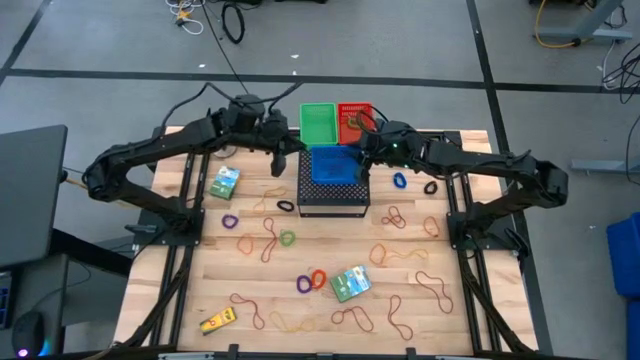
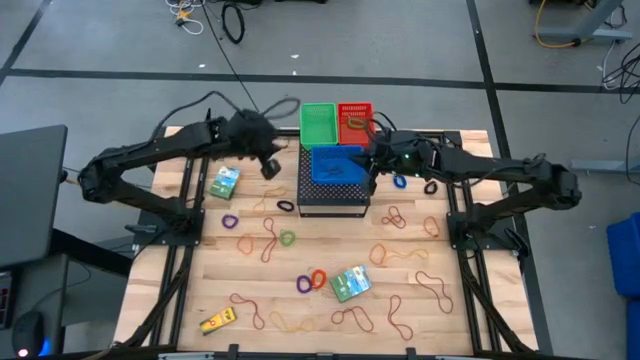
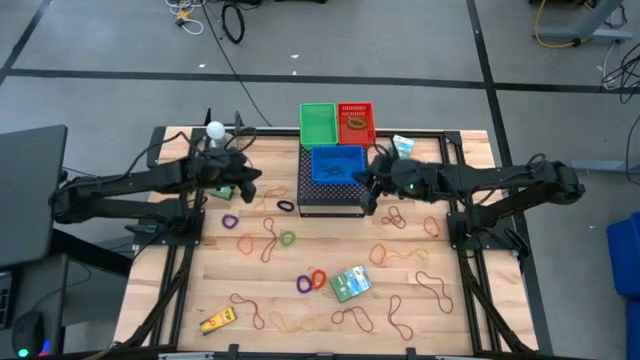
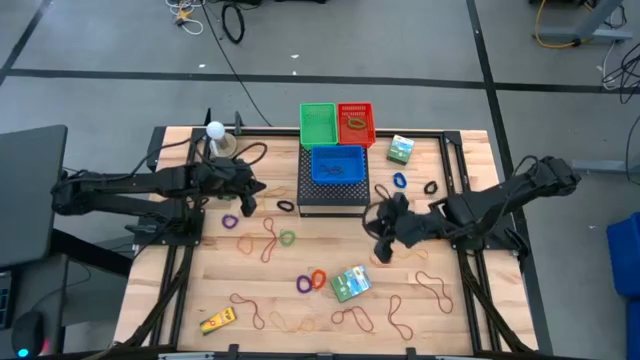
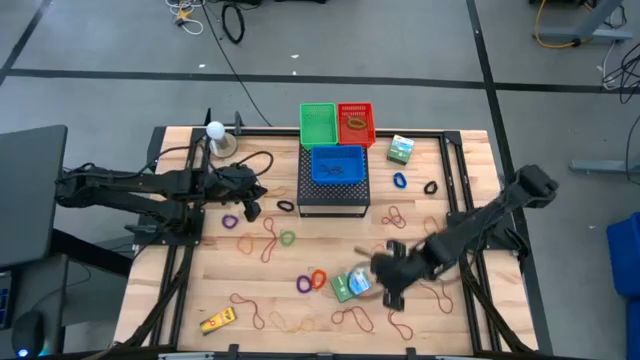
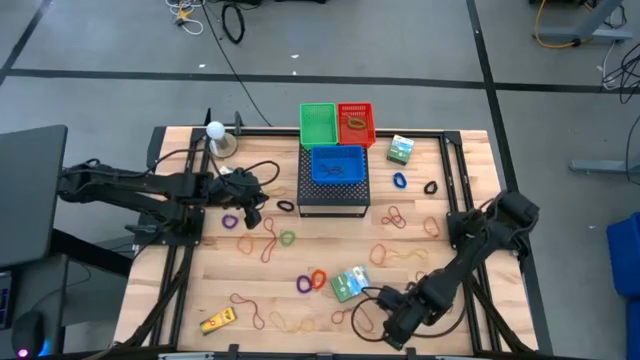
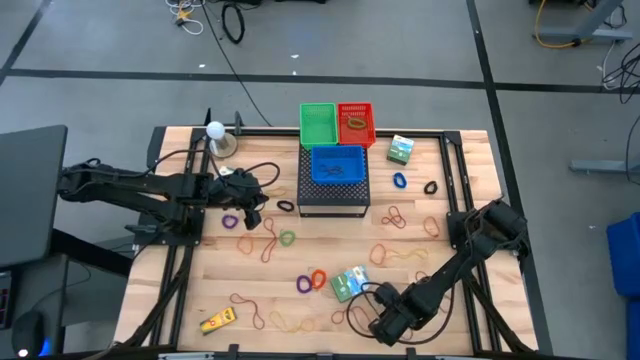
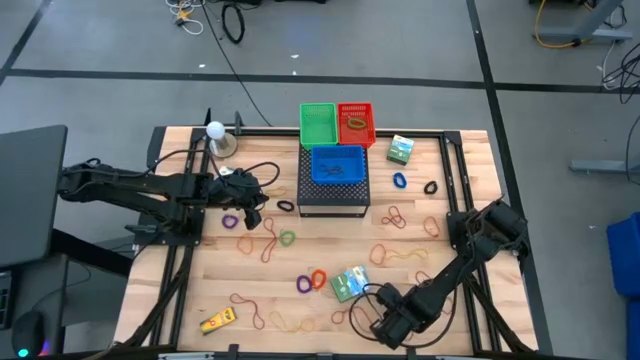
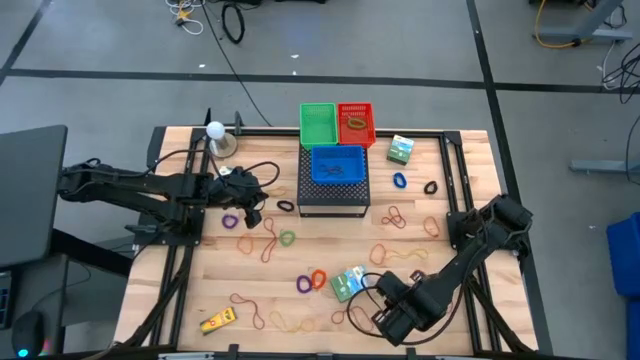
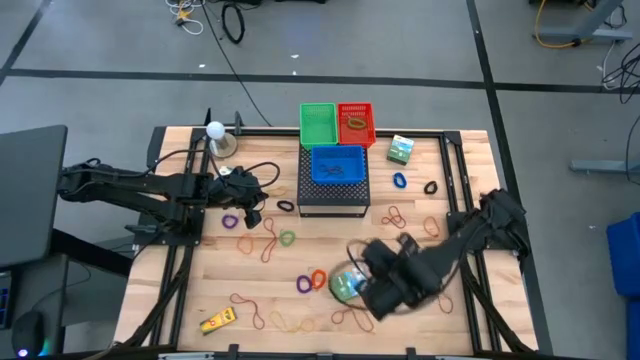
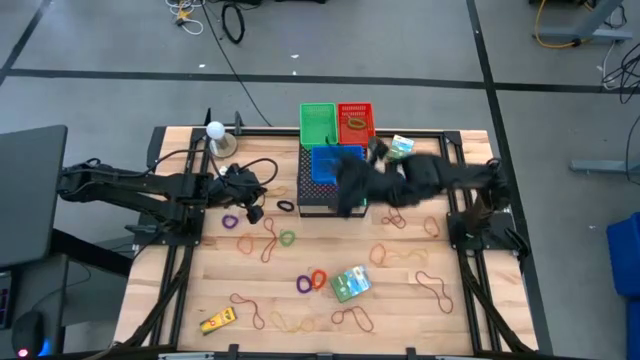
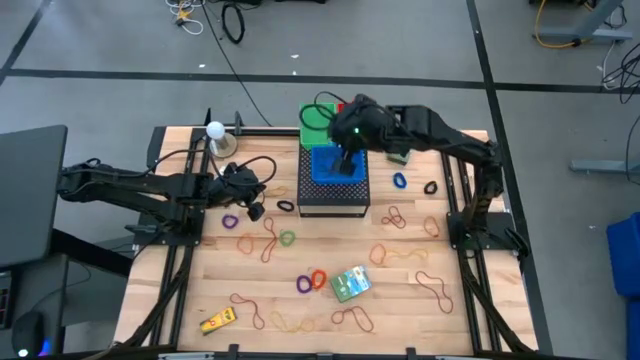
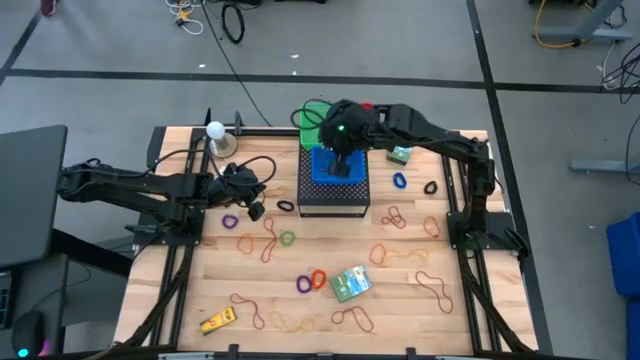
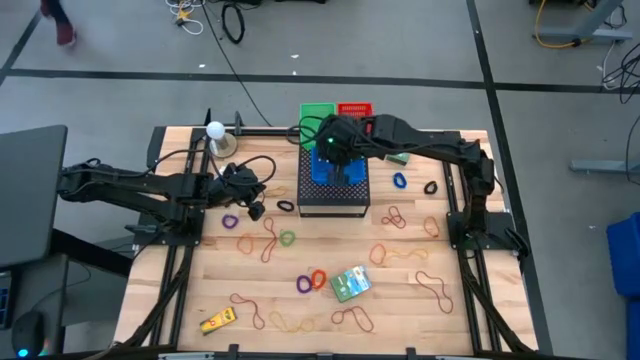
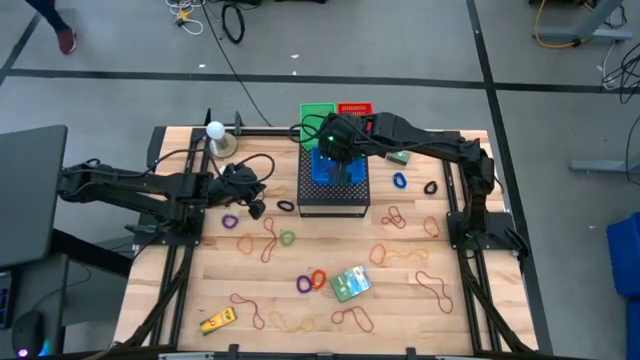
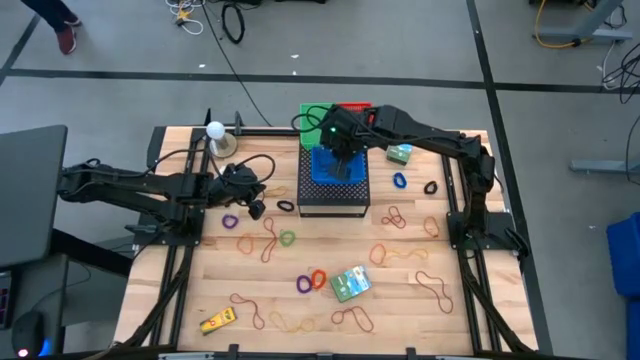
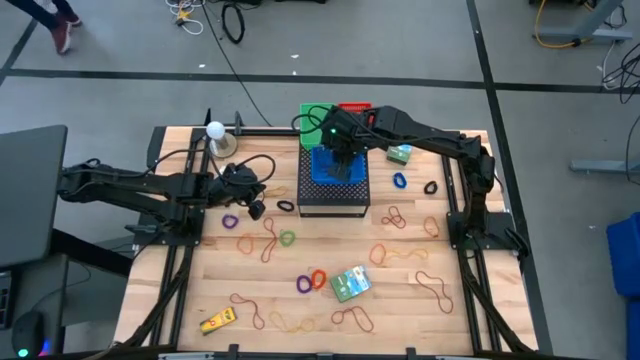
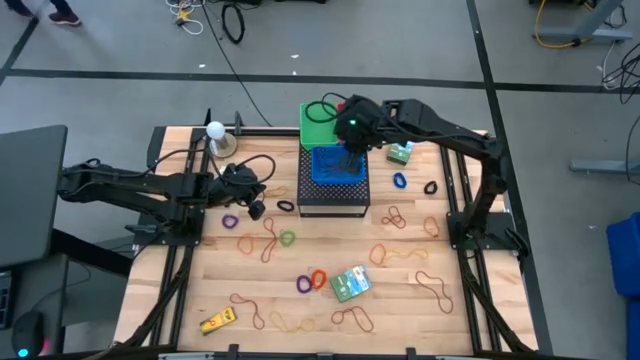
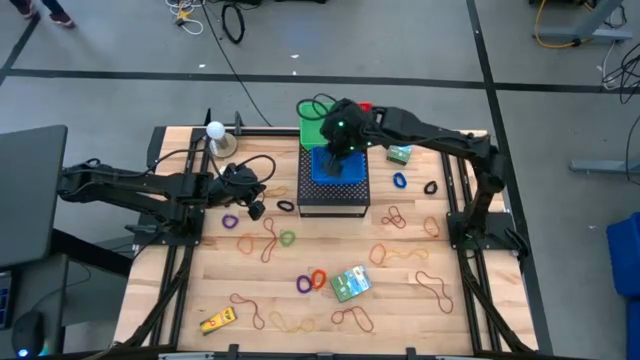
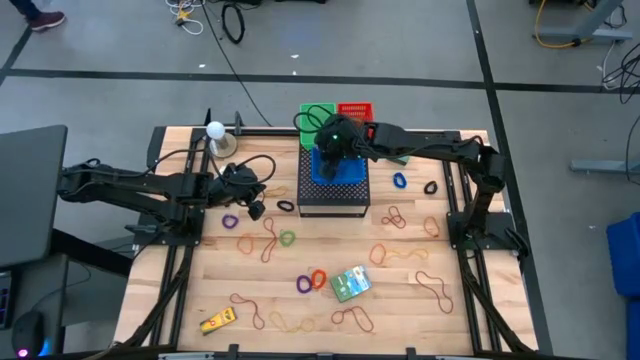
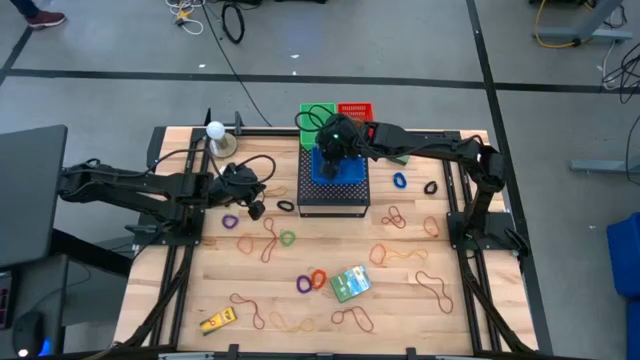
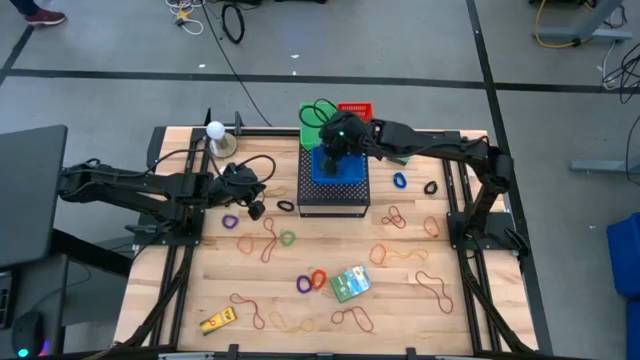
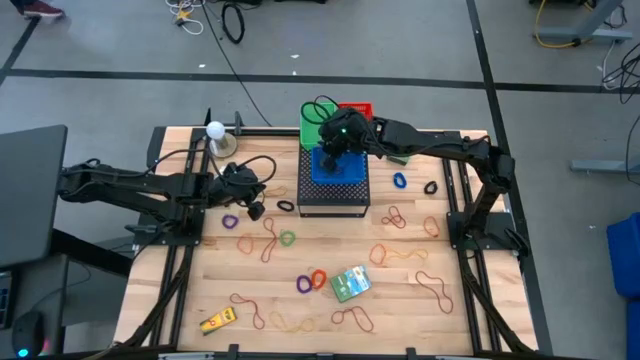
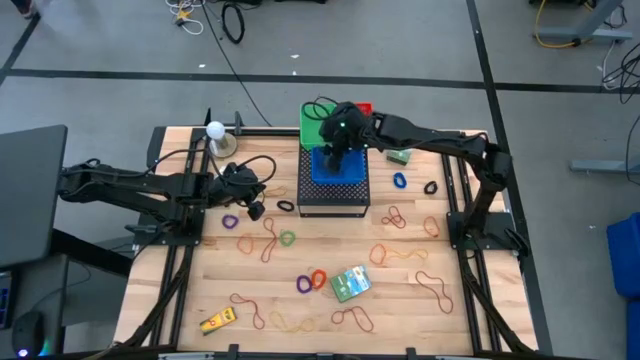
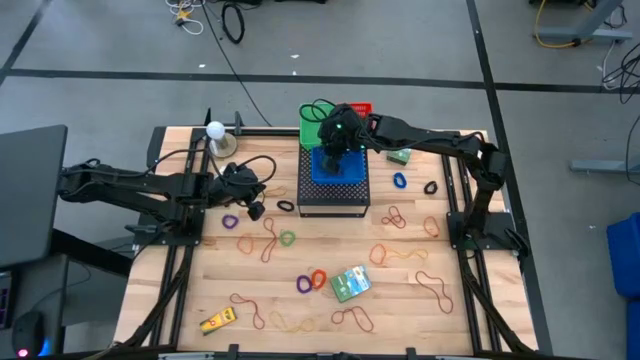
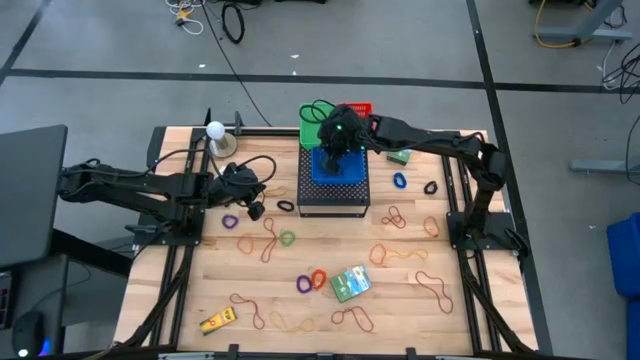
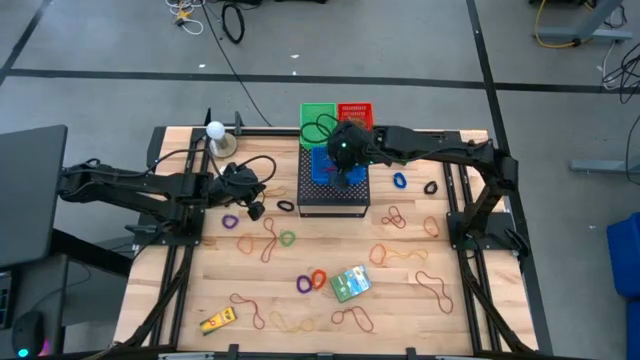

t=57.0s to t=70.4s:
Task: Pick & Place Office Desk Supplies
Put the red rubber band into the blue bin on the shelf

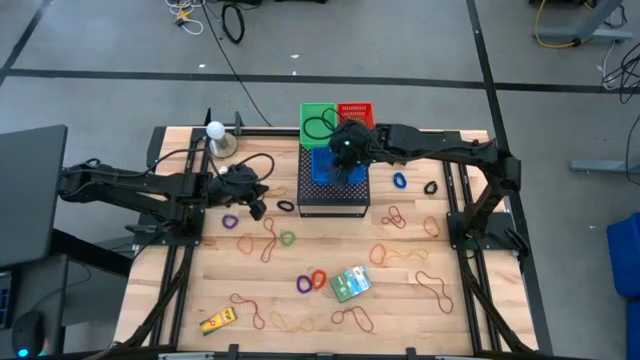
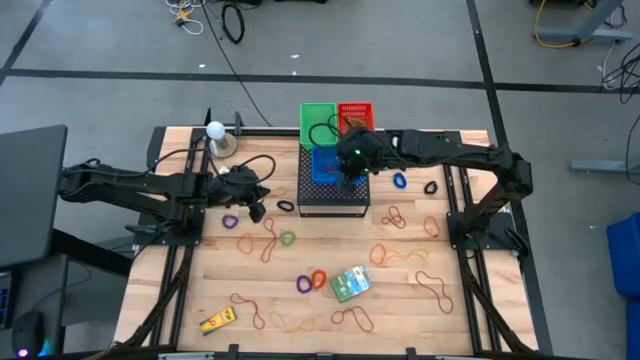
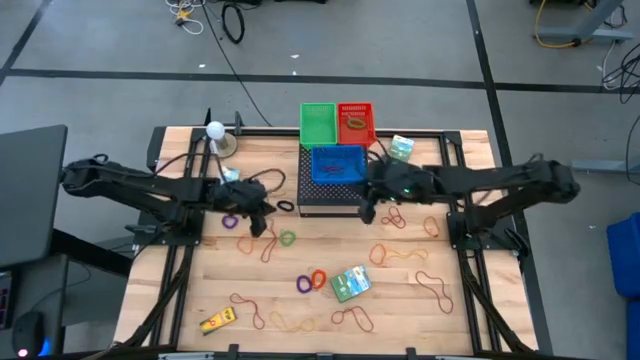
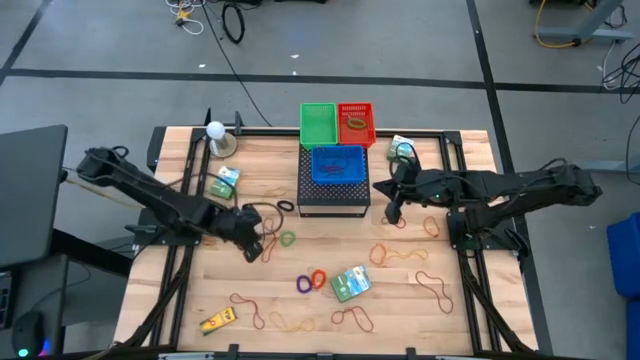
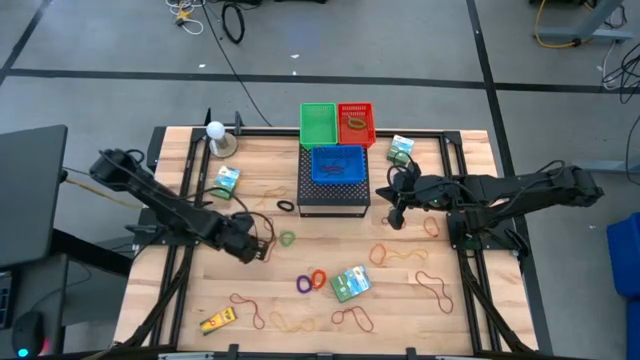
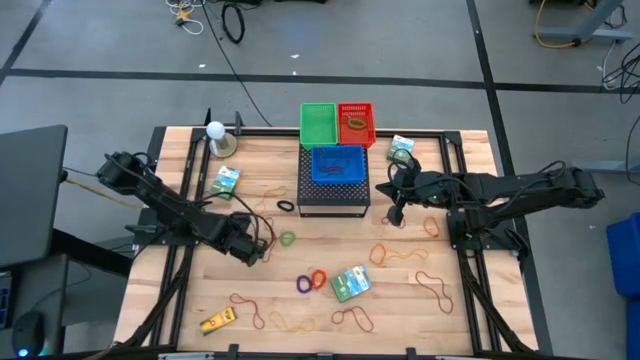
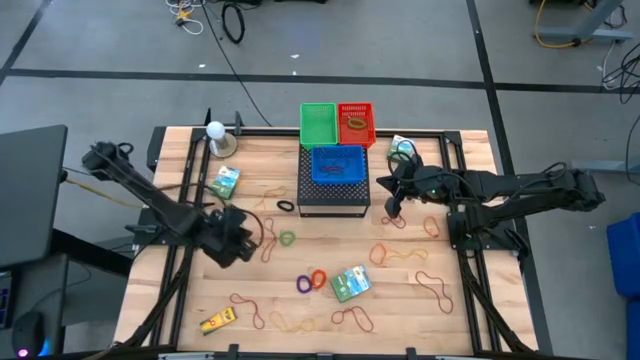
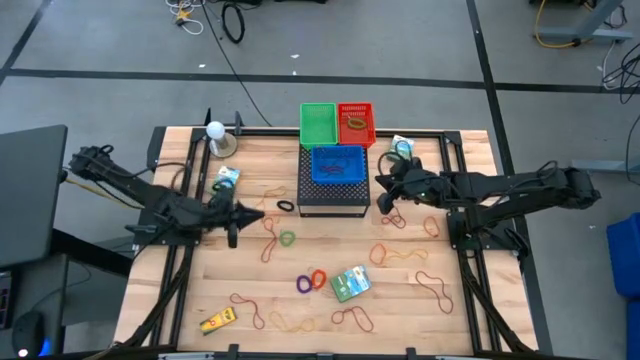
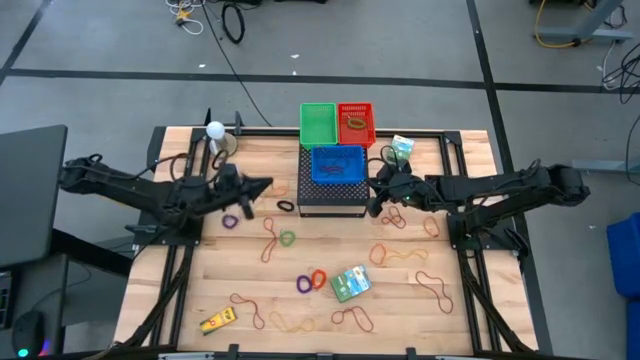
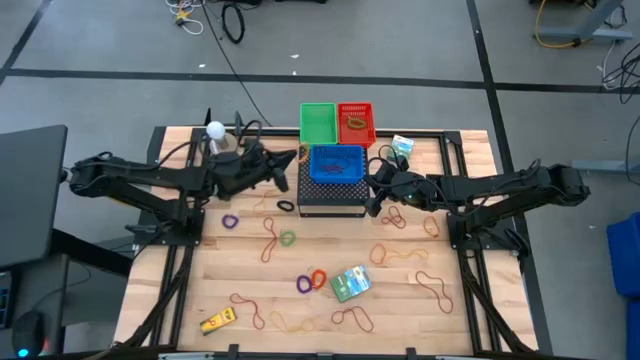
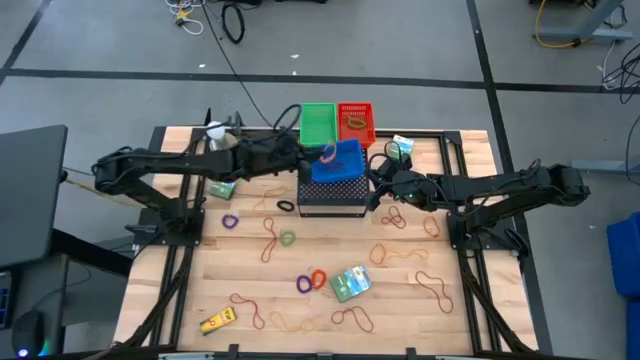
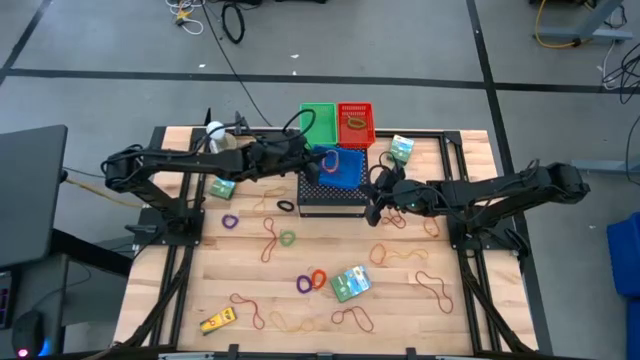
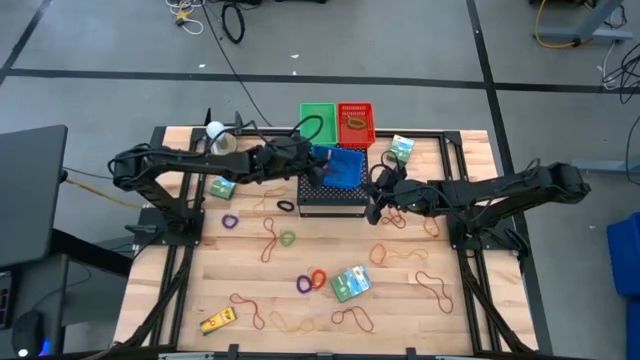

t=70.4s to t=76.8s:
Put the orange rubber band into the blue bin on the shelf

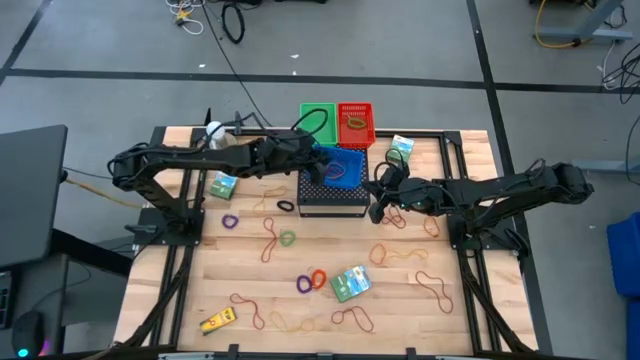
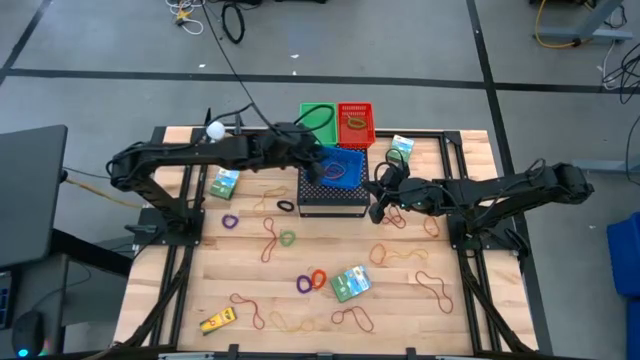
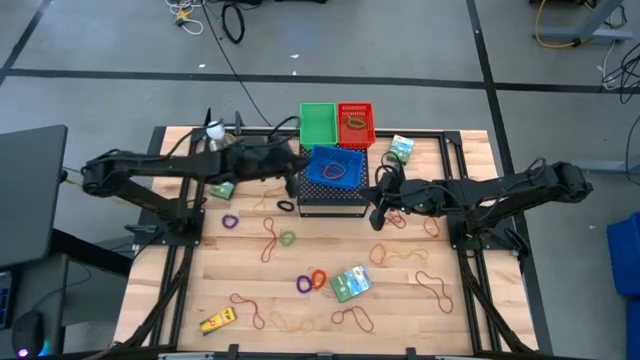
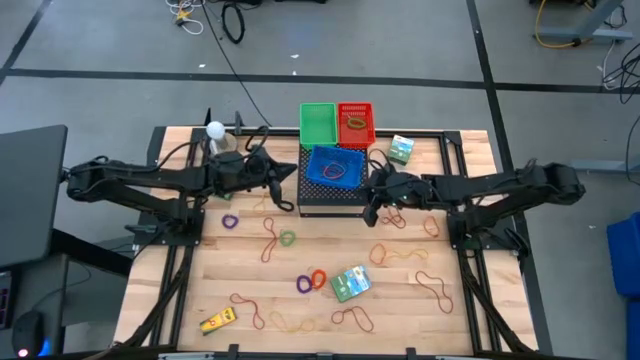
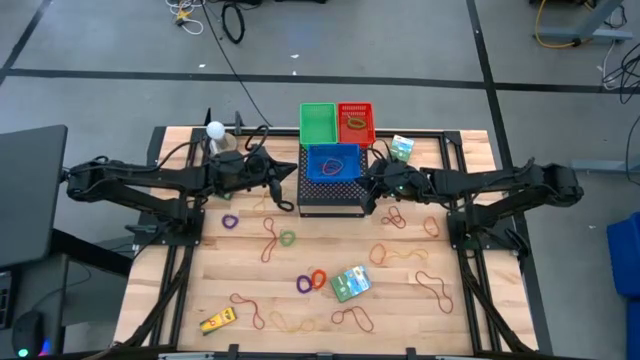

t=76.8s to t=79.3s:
Adjust the blue bin on the shelf
